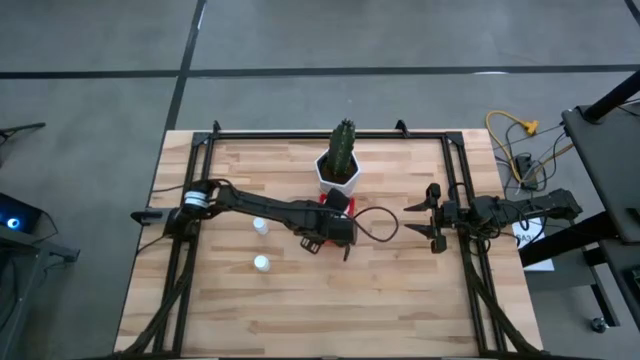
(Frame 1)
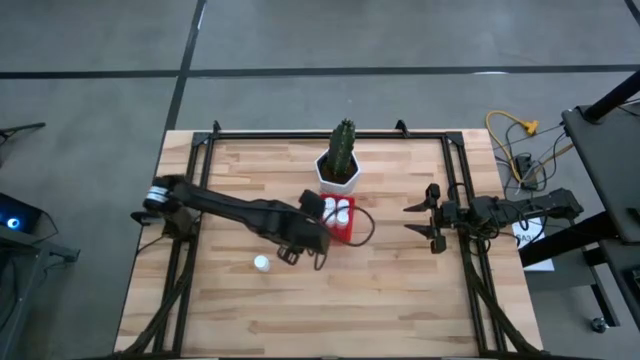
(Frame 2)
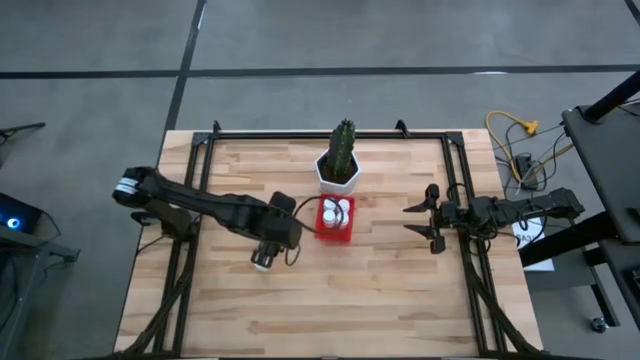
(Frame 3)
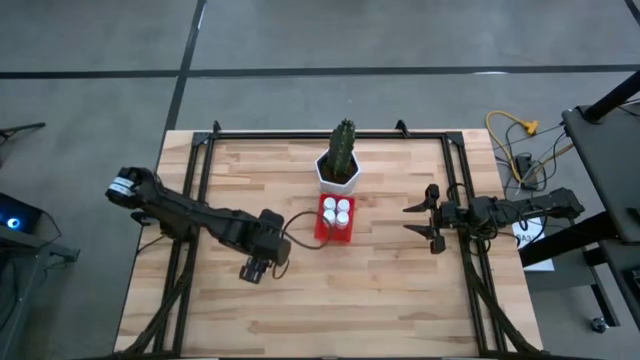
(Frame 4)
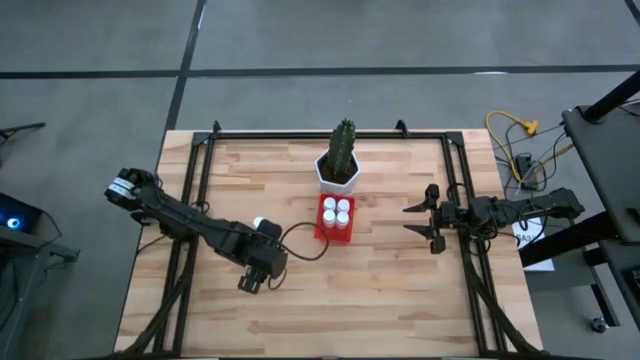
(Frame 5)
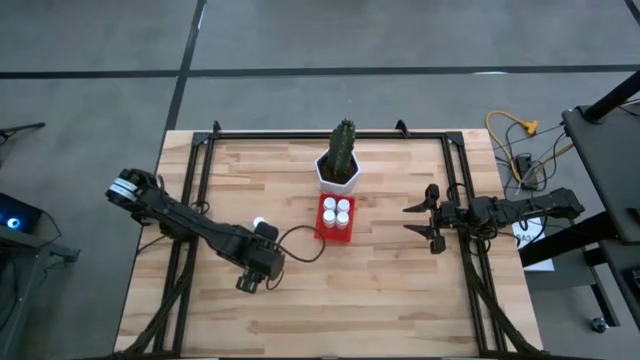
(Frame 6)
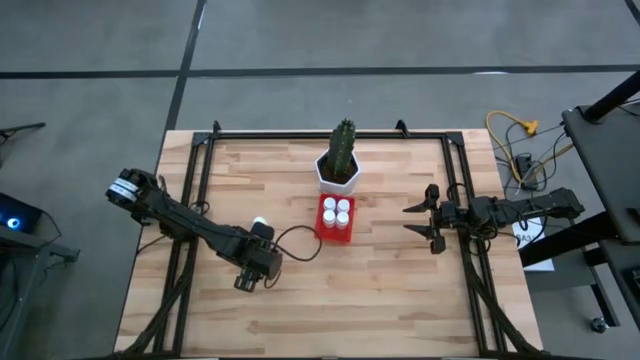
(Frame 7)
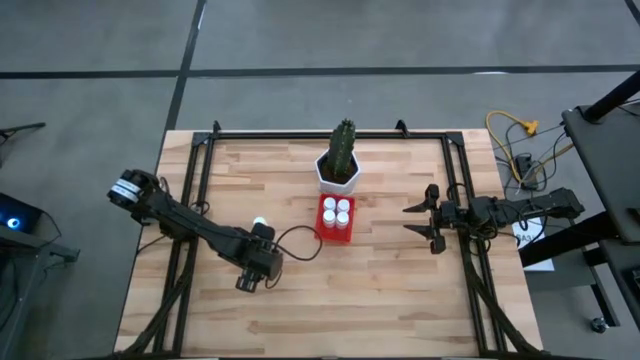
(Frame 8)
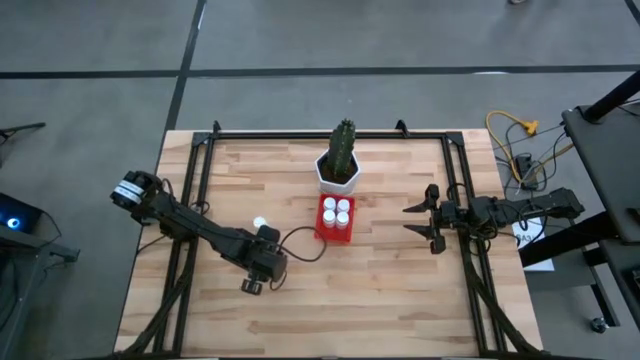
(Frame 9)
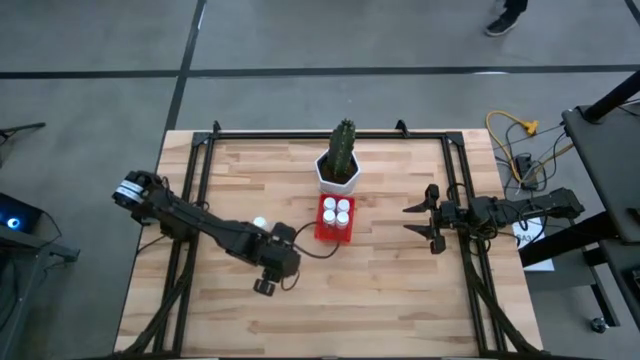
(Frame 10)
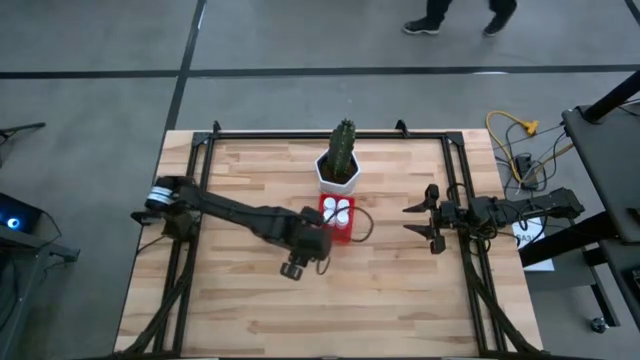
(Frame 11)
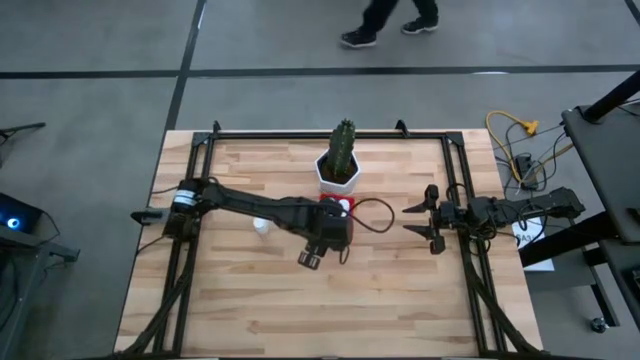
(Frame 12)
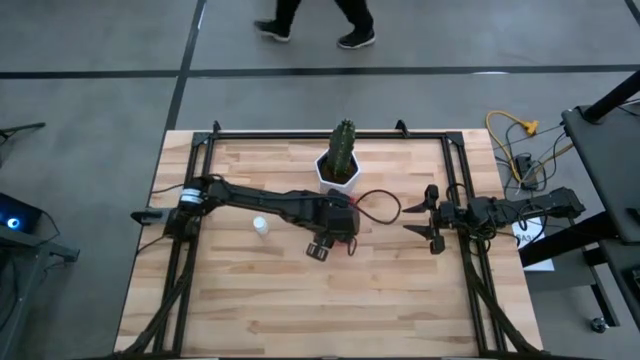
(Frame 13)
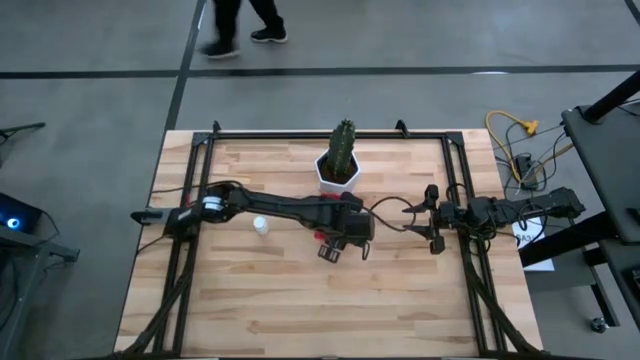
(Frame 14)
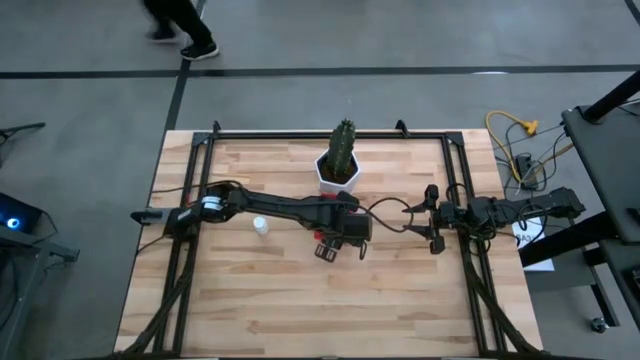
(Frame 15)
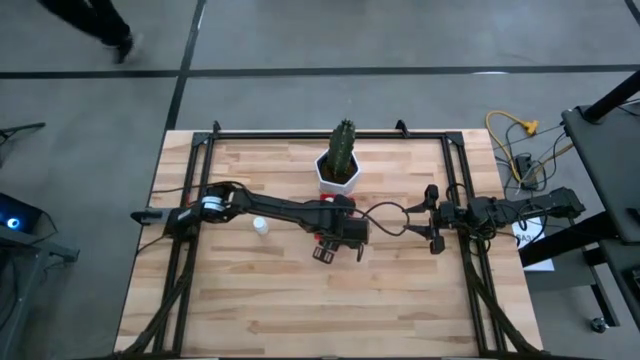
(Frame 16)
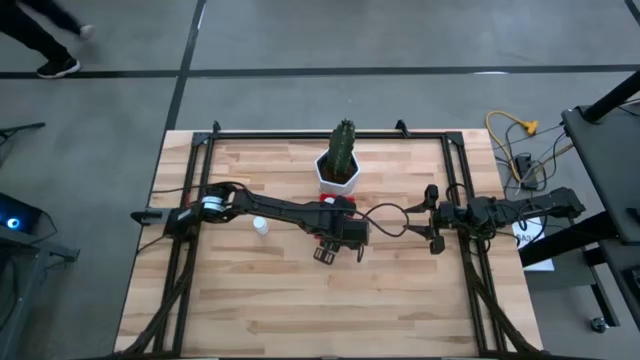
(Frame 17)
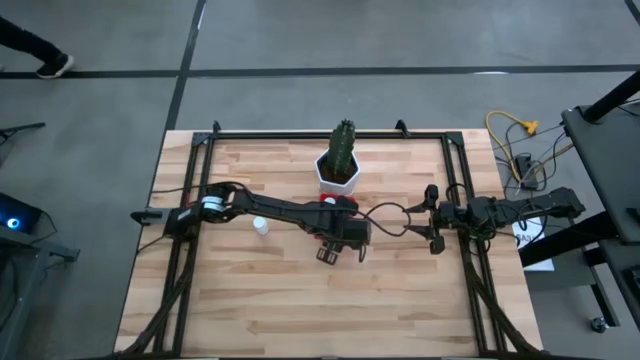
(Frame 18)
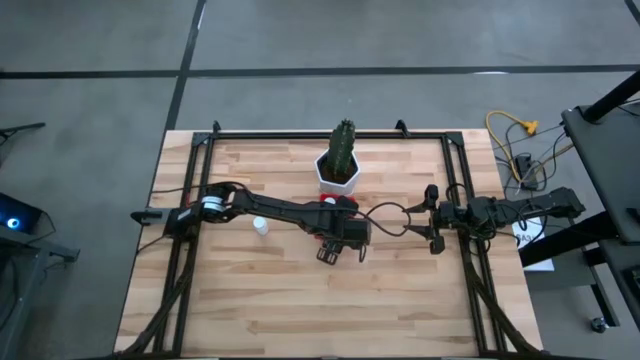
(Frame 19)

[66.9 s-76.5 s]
Task: Pick and place pill bottles into a basket
Put the white pill bottle into the red bin

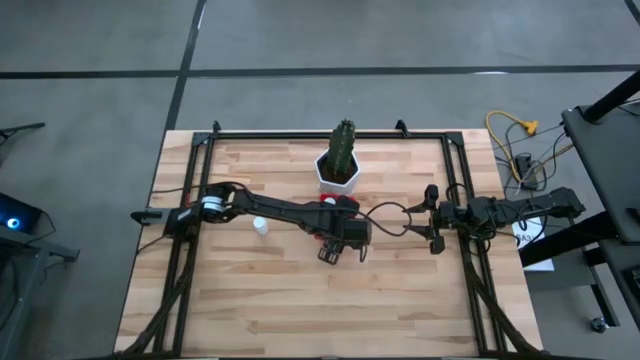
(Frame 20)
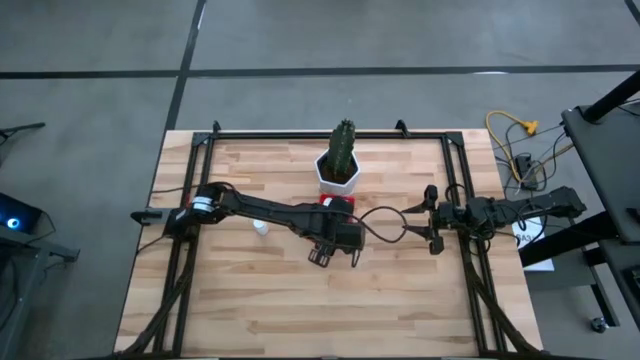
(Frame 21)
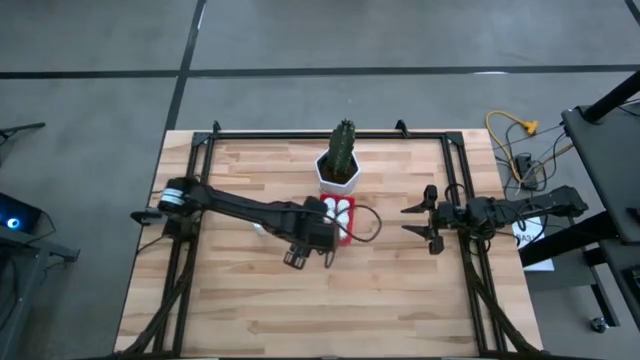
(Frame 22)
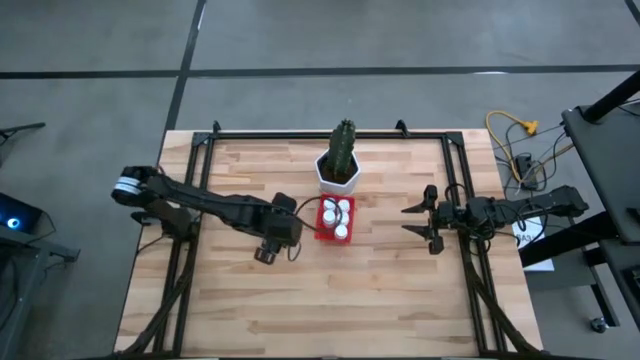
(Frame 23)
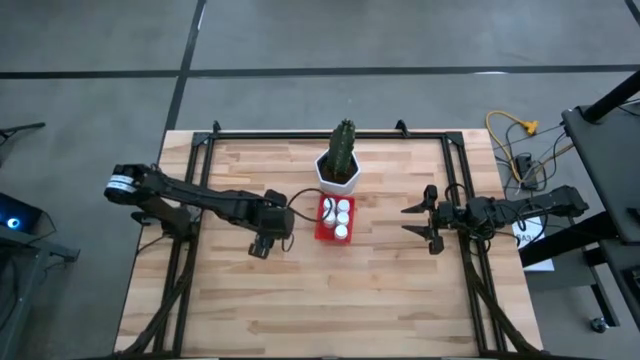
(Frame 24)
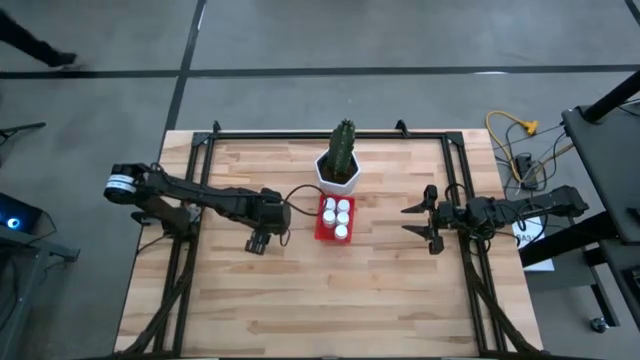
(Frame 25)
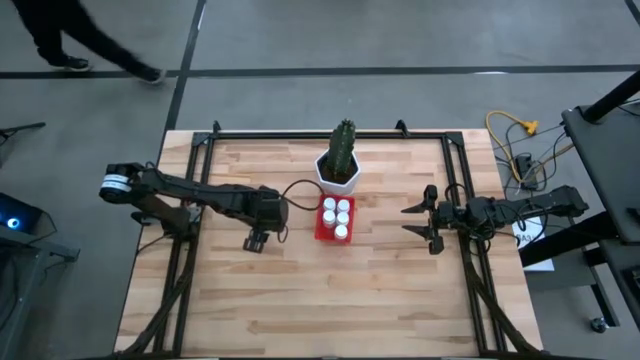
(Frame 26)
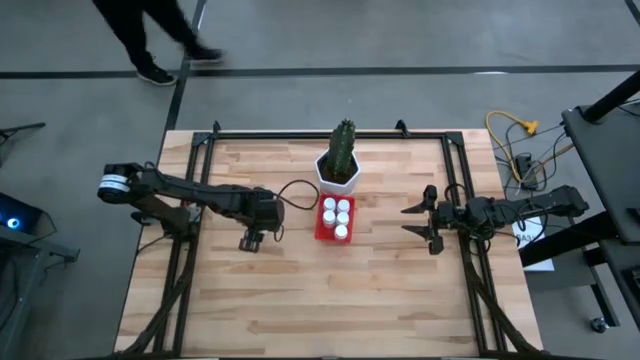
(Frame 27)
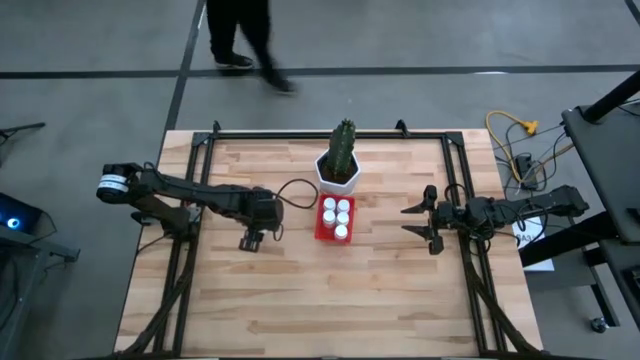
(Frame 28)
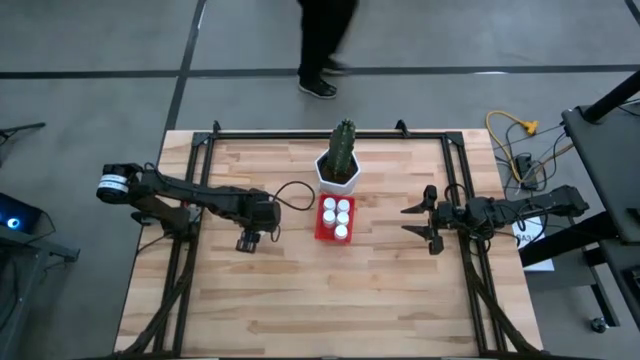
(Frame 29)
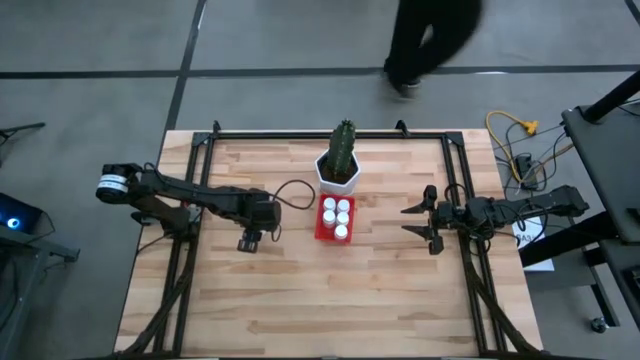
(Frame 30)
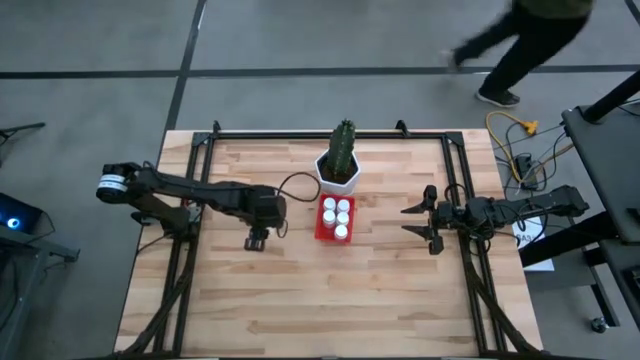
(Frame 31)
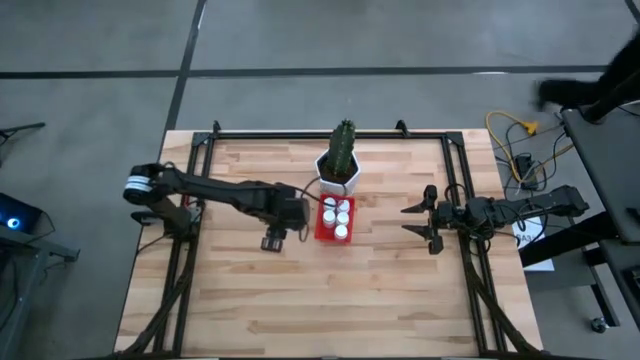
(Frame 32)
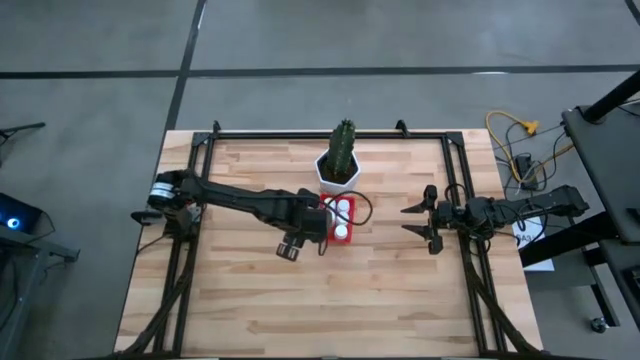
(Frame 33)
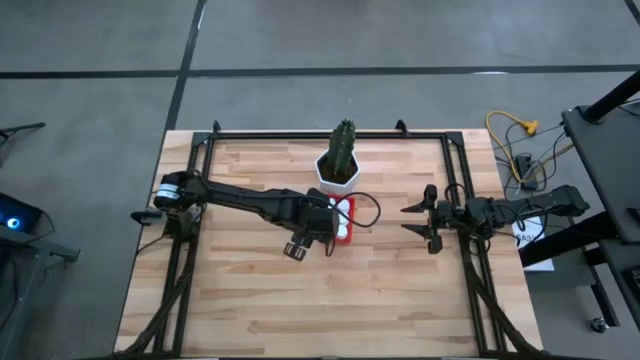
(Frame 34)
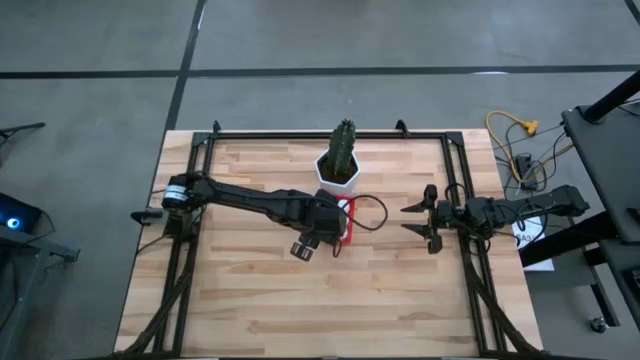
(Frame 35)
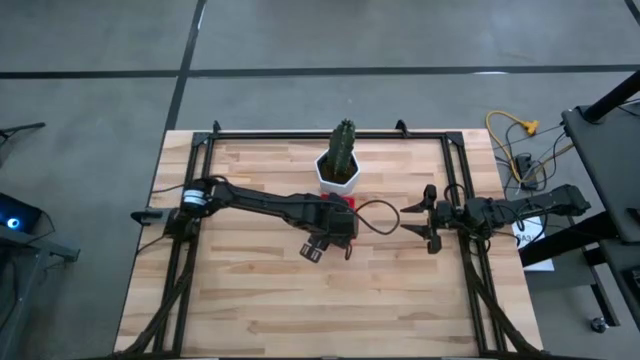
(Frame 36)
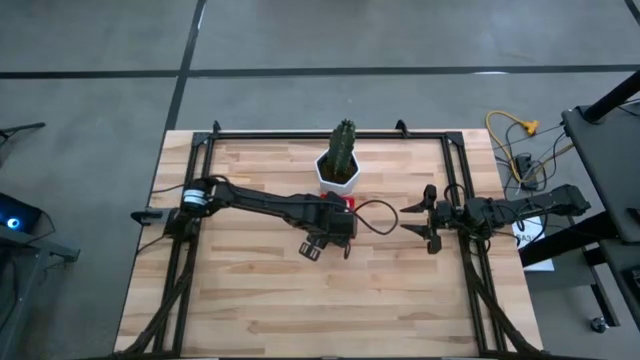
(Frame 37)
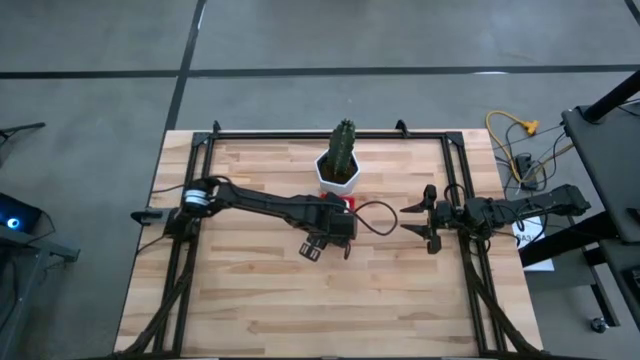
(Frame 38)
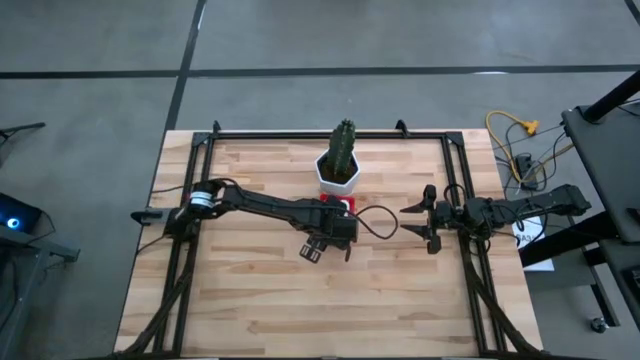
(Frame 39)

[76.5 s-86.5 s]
Put the white pill bottle into the red bin

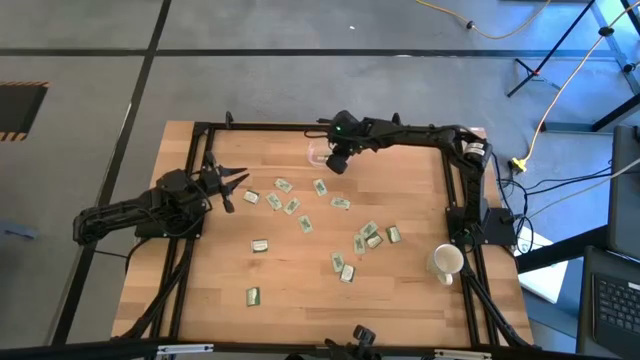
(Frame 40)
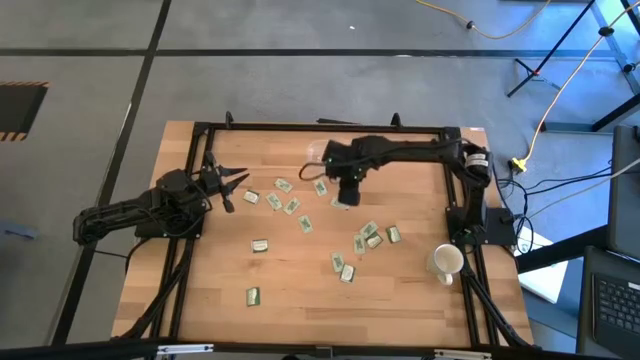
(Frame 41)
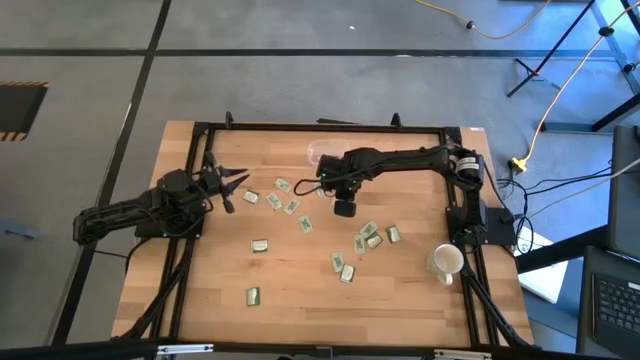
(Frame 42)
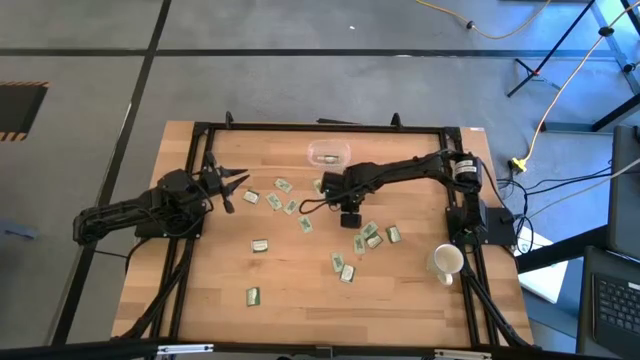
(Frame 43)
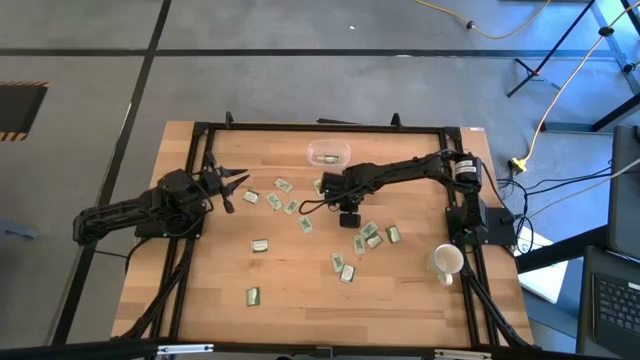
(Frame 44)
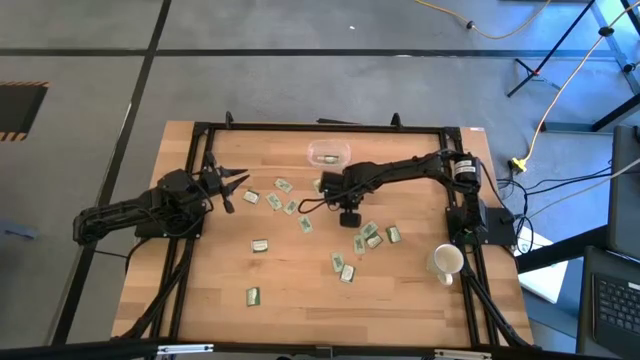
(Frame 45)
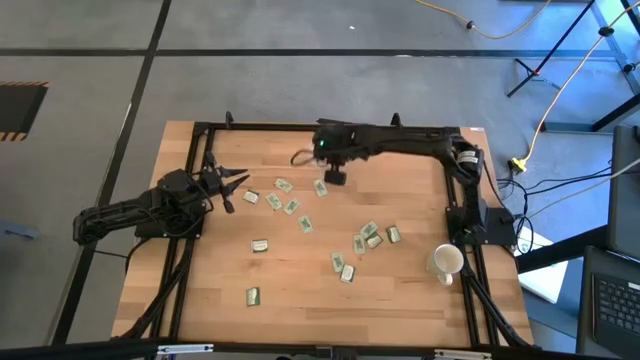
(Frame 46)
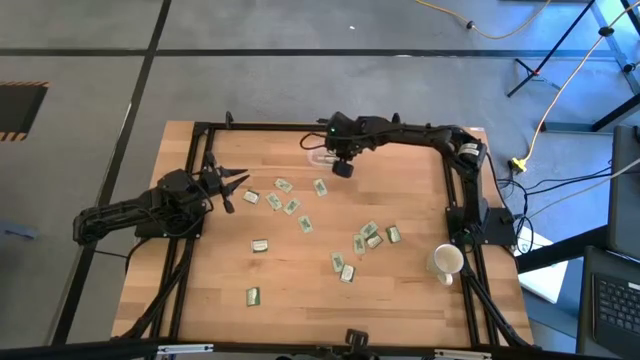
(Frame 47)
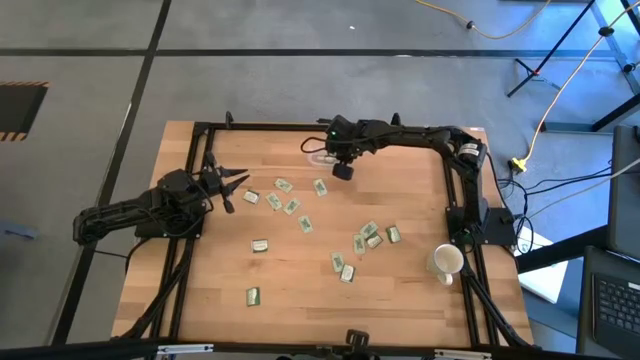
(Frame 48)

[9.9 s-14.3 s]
Task: Pick and place items into bin
Put the white stevia packet into the transparent bin
